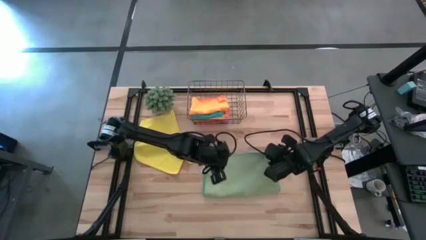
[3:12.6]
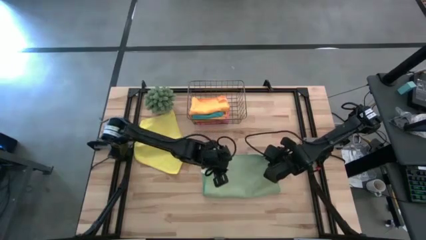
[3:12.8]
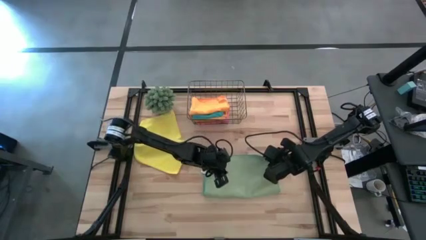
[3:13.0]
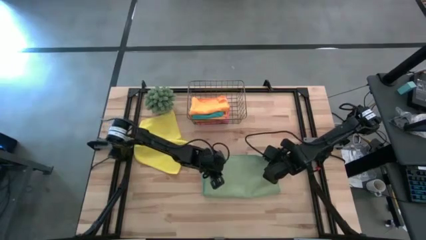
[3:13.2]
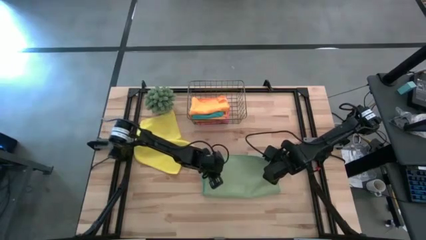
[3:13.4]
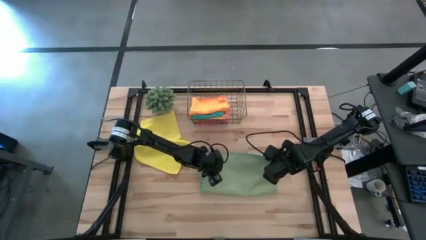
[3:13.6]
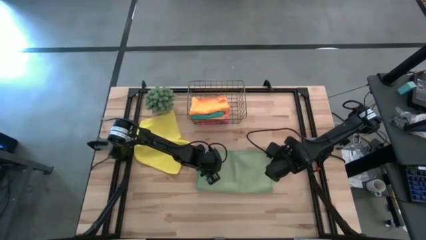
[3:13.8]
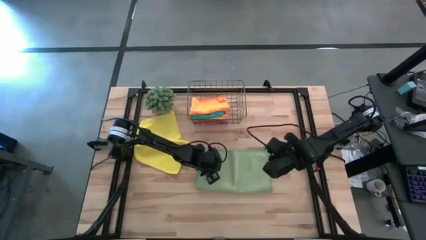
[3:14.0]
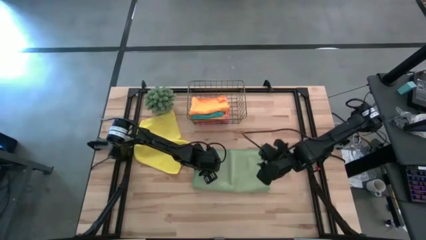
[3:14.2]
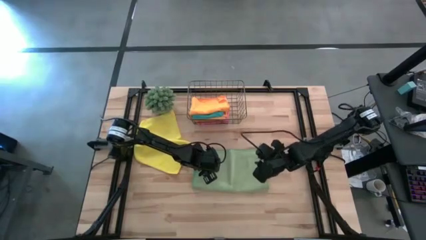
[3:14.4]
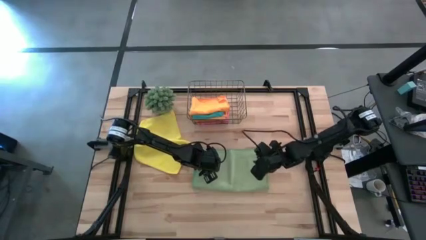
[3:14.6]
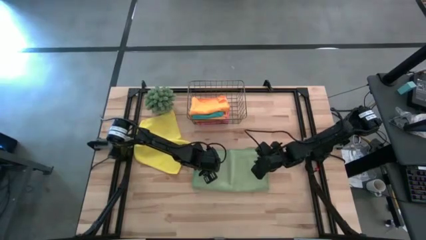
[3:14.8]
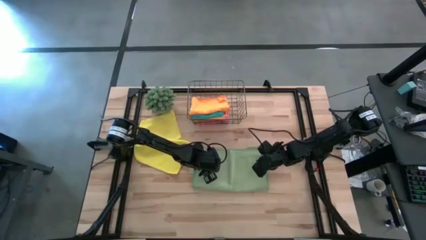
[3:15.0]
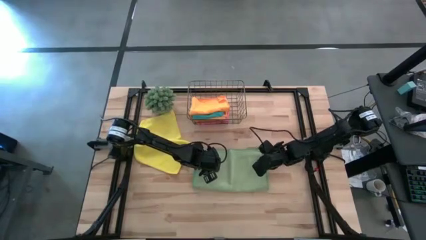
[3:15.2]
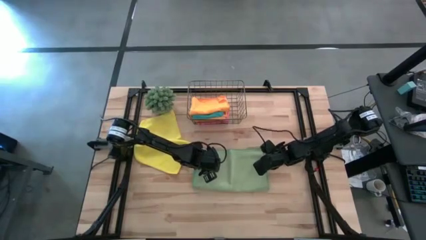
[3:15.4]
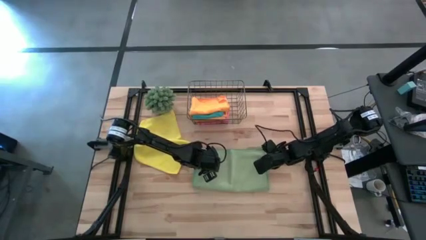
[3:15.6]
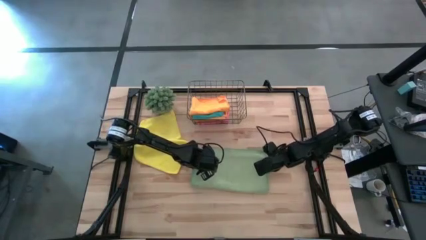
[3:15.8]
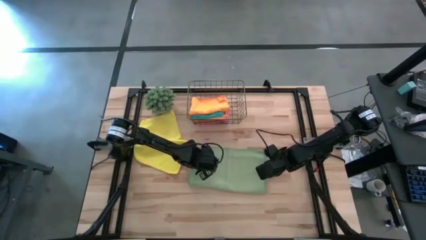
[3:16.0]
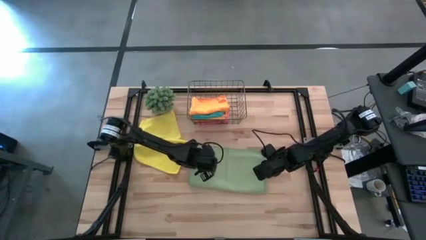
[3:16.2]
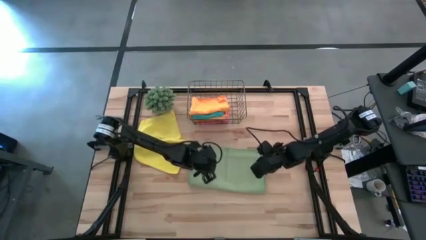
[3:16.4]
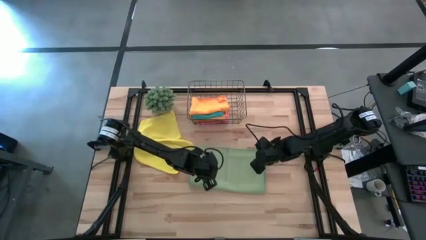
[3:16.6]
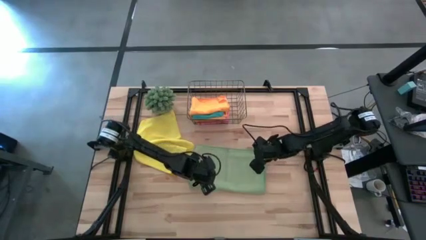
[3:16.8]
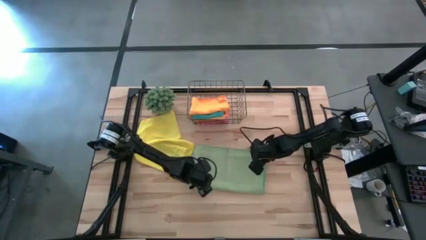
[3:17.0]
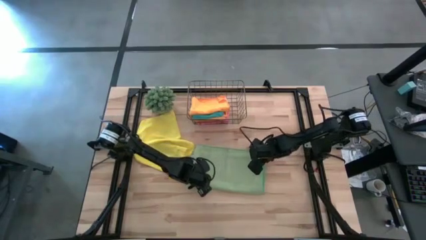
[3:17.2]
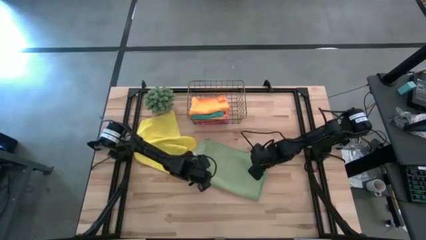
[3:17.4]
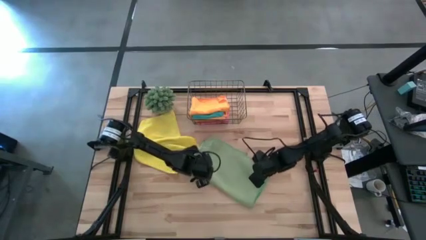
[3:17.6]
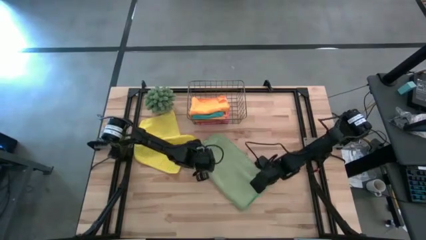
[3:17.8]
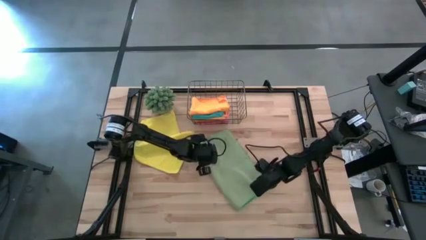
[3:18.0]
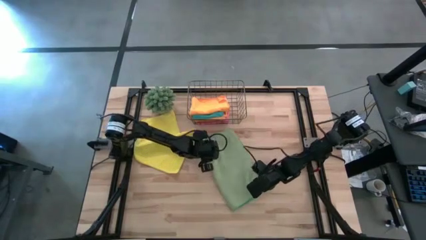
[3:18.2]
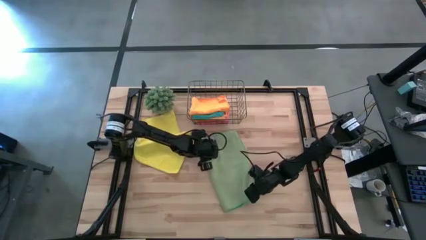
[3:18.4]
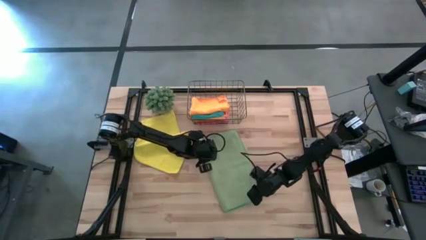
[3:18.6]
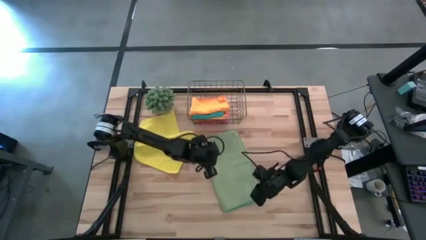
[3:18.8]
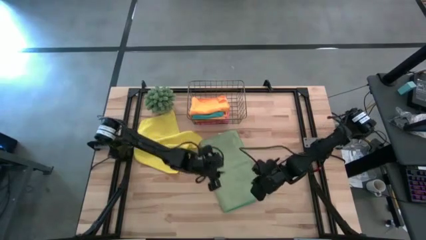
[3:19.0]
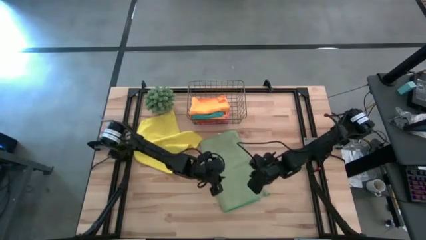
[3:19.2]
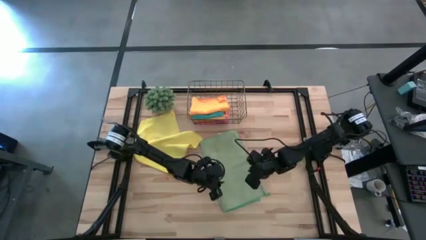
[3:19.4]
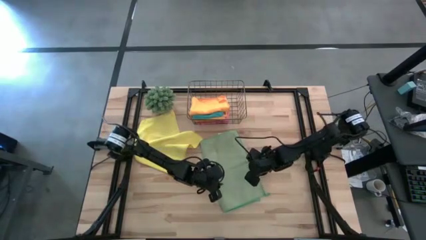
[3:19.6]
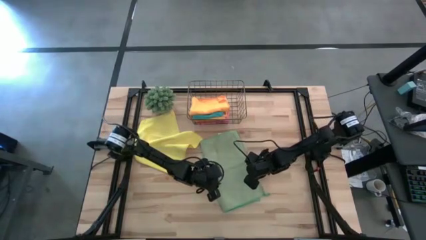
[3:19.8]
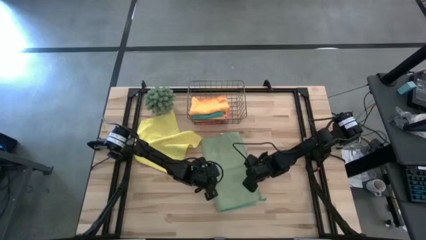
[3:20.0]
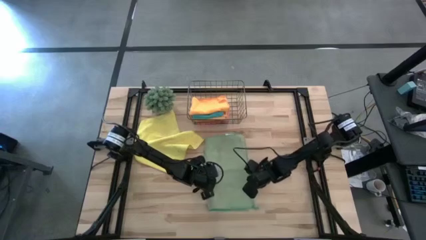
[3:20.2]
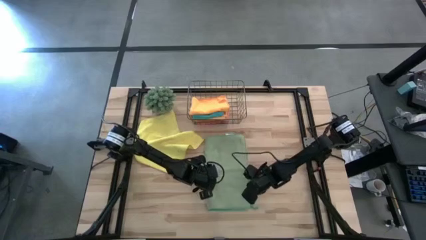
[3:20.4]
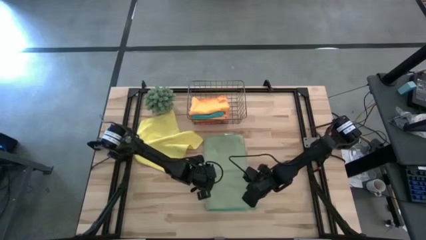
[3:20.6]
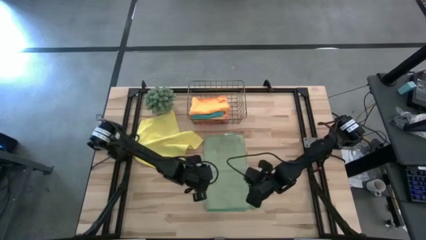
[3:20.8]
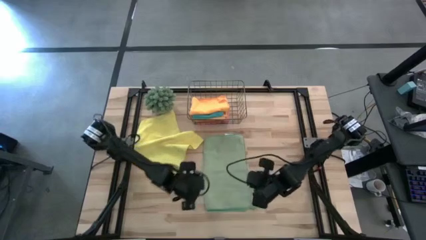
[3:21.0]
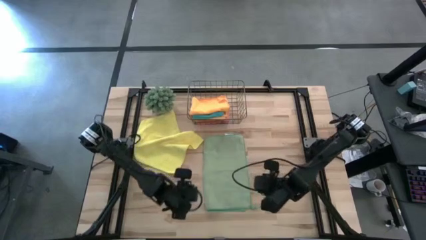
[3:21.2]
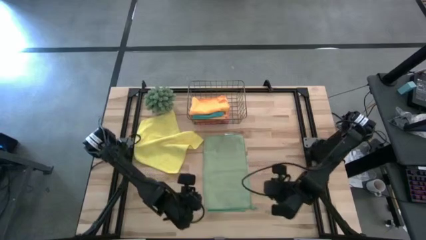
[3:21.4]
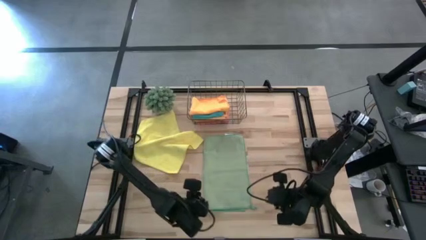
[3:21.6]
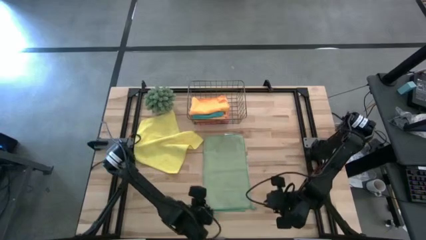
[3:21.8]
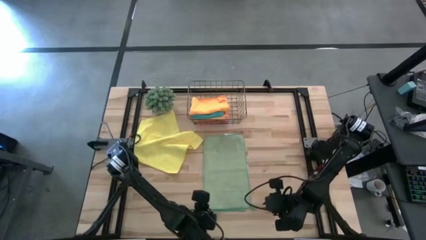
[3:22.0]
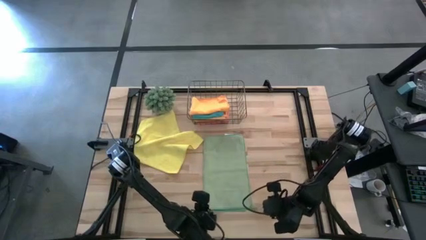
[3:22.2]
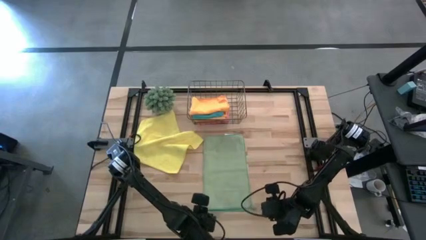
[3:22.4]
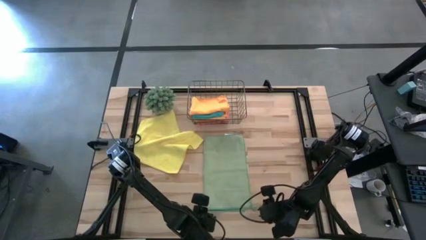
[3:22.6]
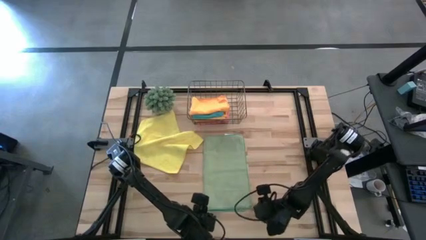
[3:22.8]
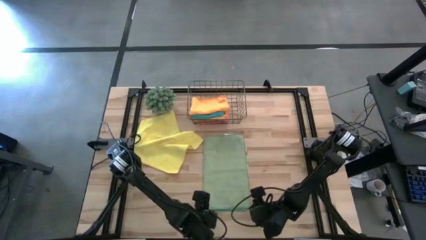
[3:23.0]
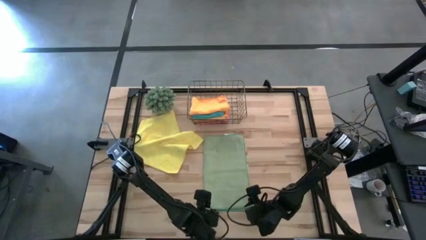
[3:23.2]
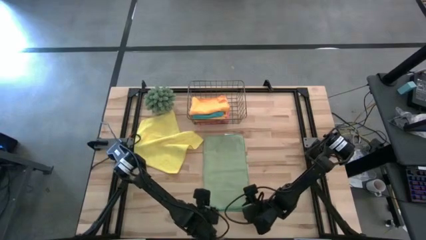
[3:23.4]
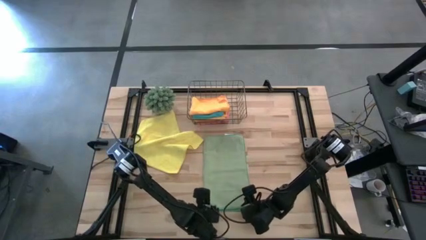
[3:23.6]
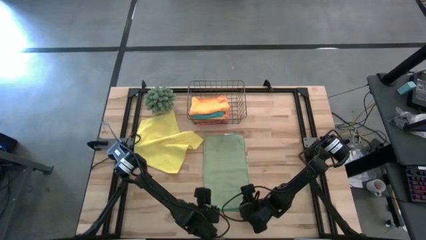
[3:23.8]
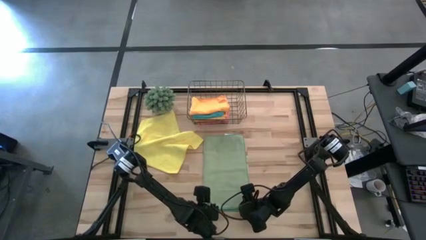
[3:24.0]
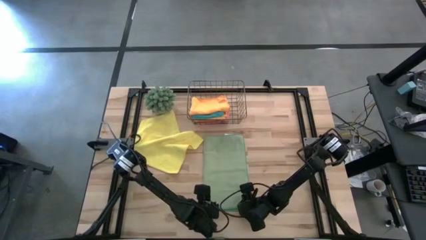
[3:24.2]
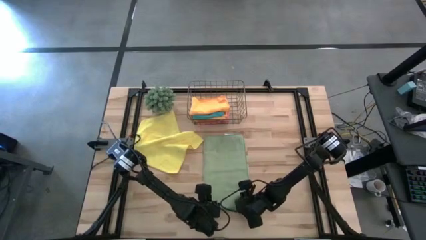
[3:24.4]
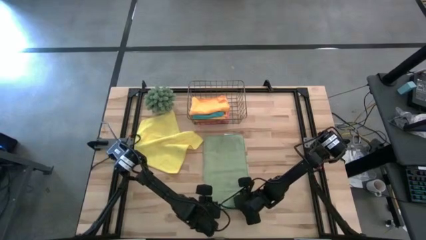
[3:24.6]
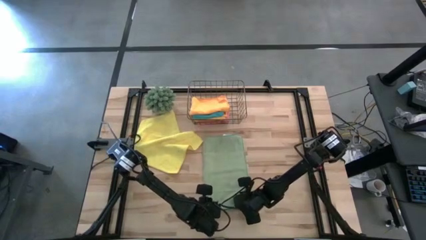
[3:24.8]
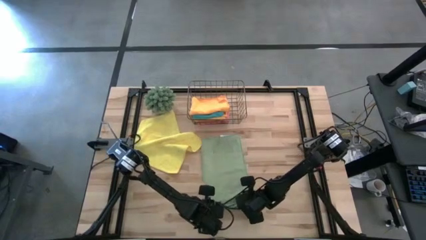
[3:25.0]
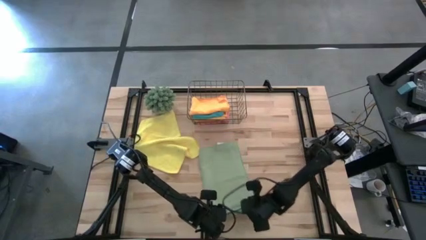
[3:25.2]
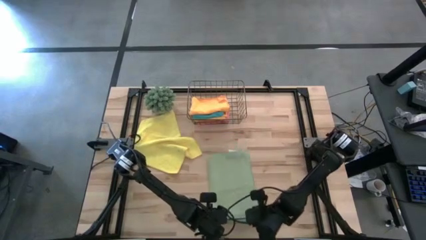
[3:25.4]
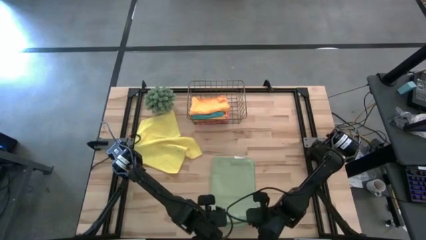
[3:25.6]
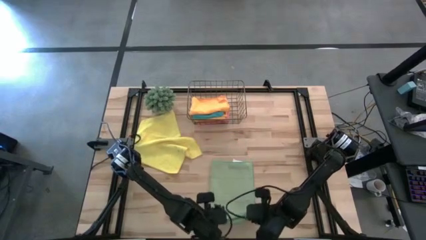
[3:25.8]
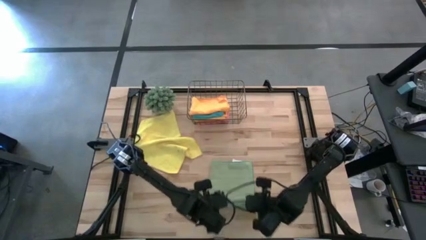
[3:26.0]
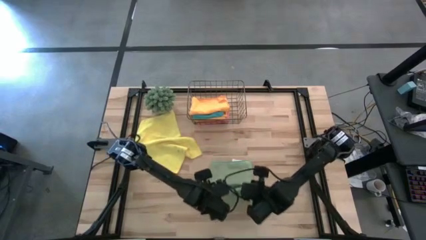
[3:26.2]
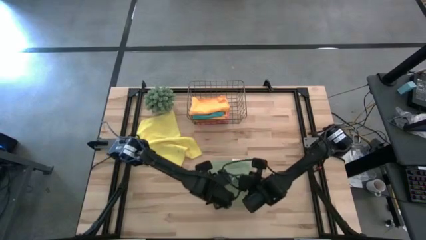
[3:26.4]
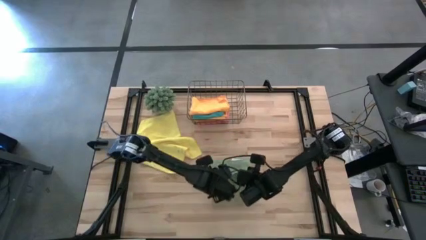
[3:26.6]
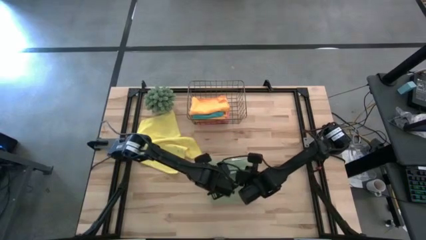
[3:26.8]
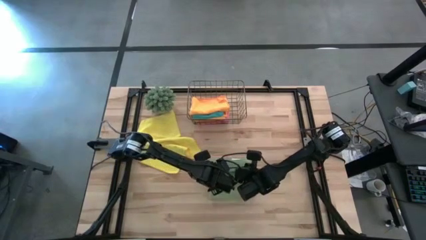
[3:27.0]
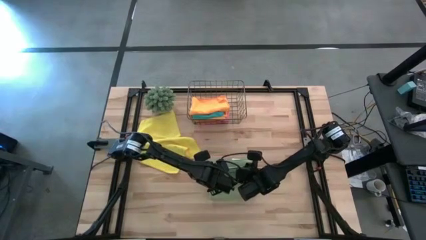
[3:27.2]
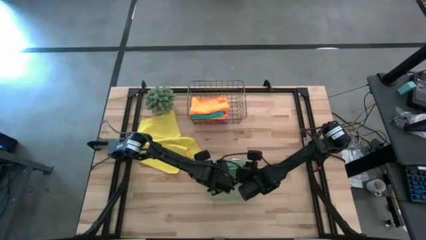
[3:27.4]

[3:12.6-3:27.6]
Task: Fold microfiber towels
Fold the light green microfiber towel
